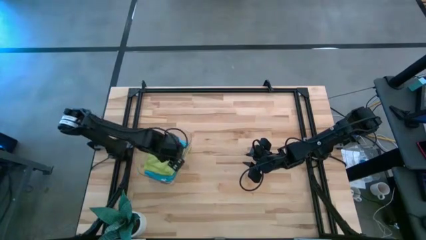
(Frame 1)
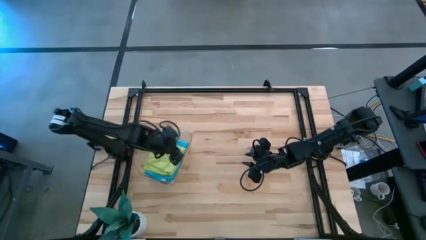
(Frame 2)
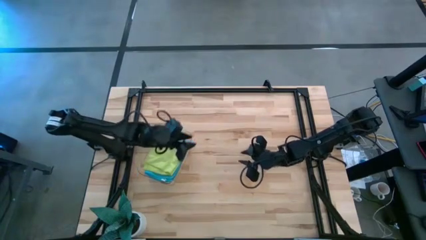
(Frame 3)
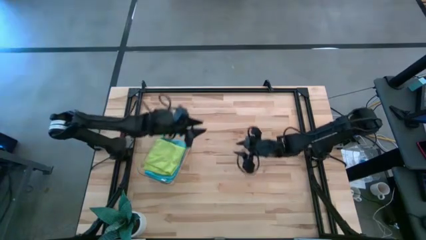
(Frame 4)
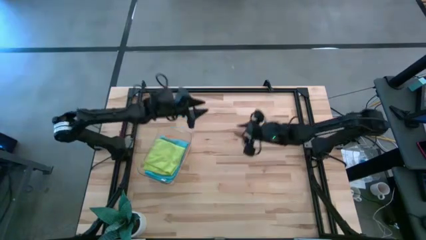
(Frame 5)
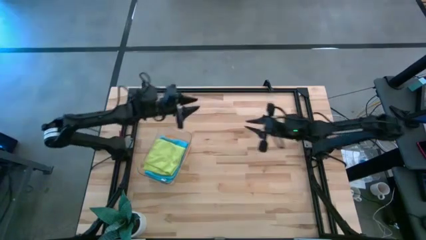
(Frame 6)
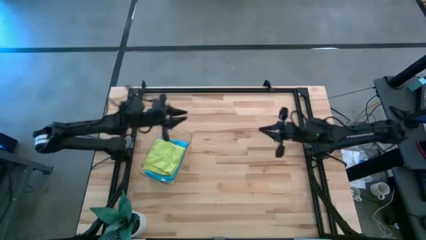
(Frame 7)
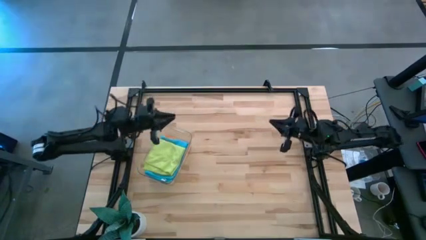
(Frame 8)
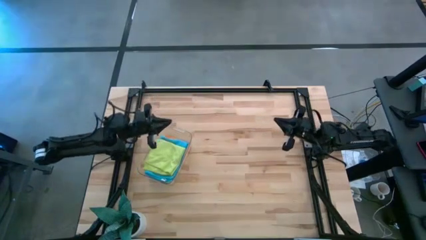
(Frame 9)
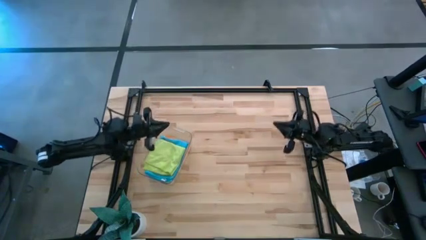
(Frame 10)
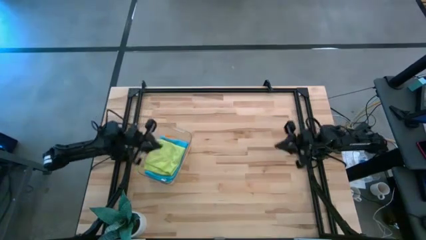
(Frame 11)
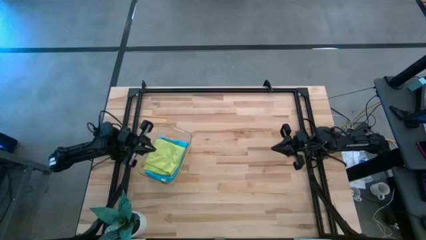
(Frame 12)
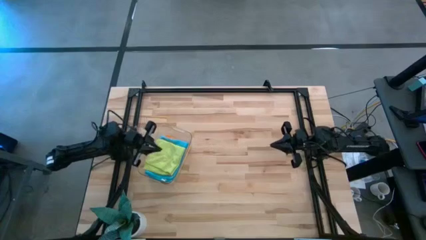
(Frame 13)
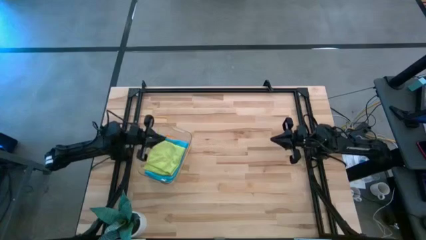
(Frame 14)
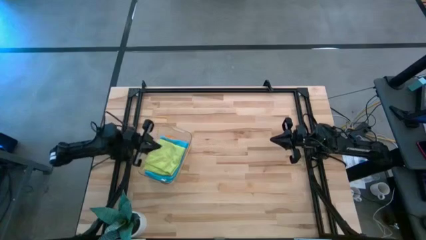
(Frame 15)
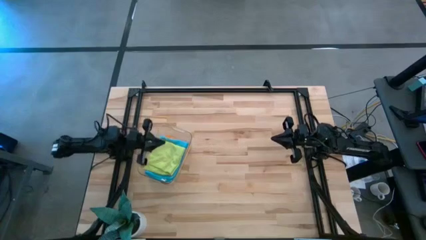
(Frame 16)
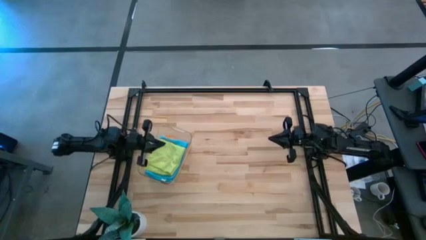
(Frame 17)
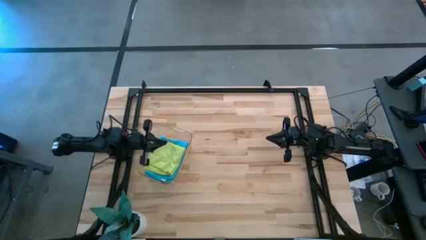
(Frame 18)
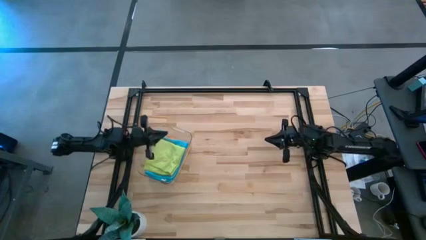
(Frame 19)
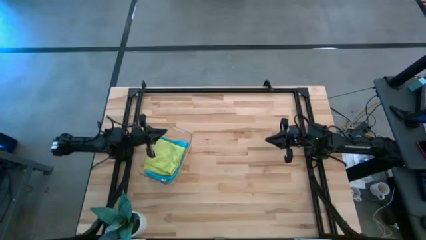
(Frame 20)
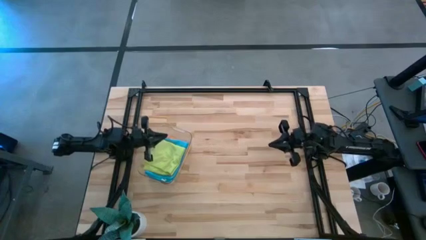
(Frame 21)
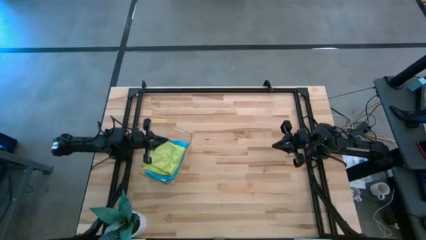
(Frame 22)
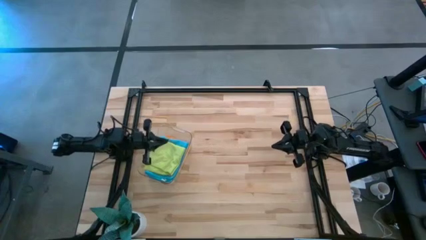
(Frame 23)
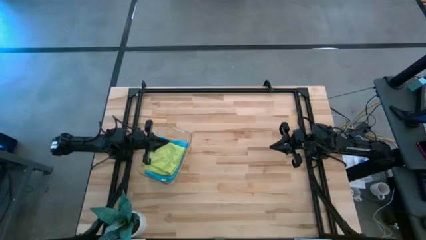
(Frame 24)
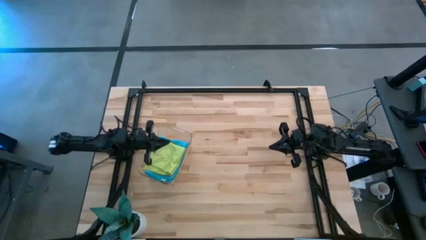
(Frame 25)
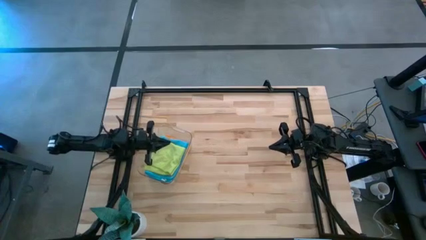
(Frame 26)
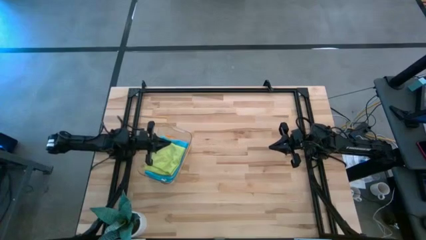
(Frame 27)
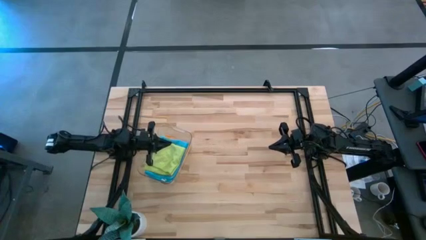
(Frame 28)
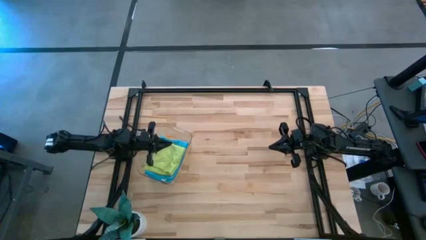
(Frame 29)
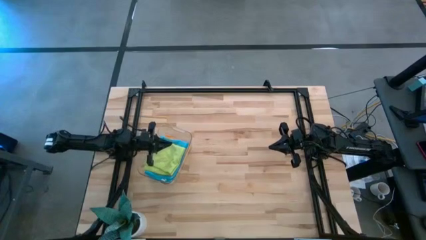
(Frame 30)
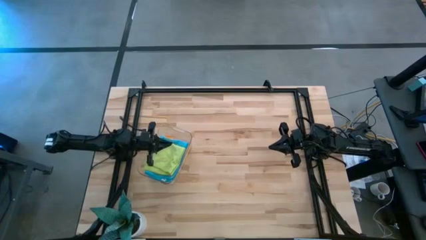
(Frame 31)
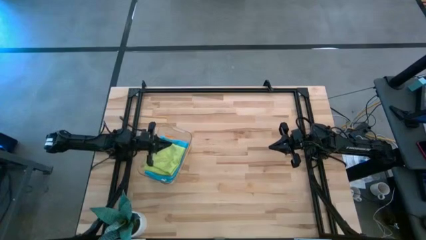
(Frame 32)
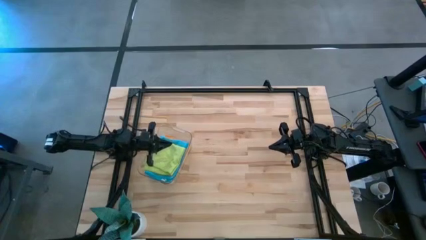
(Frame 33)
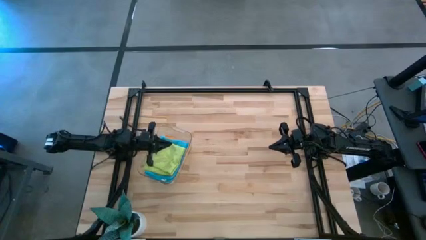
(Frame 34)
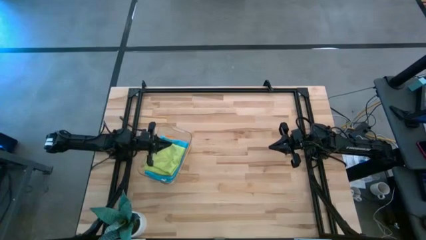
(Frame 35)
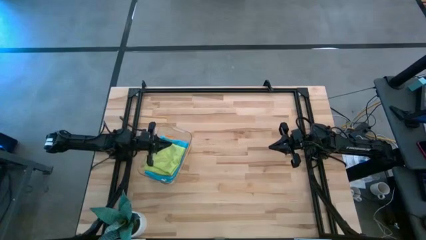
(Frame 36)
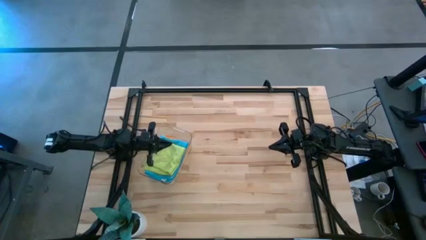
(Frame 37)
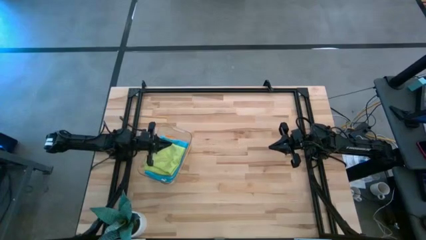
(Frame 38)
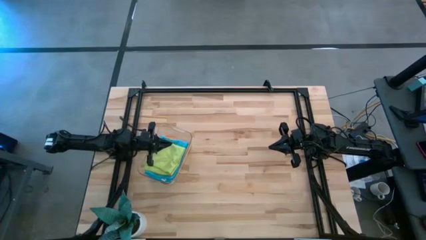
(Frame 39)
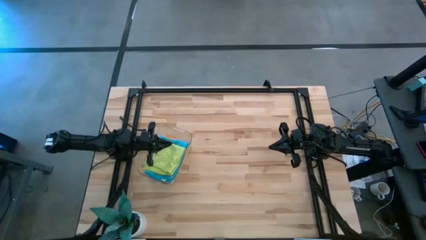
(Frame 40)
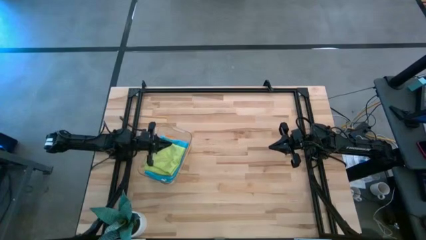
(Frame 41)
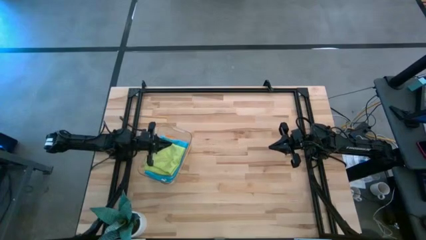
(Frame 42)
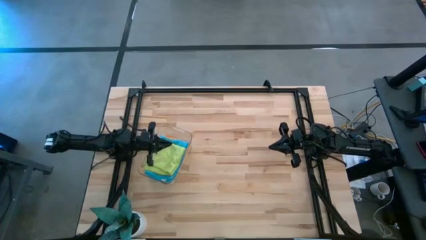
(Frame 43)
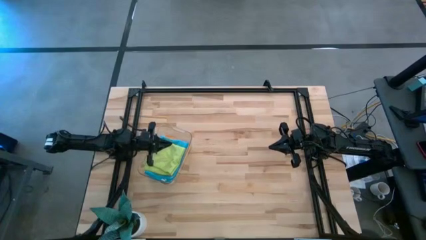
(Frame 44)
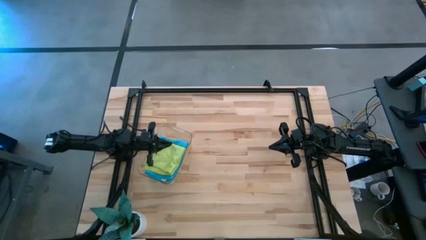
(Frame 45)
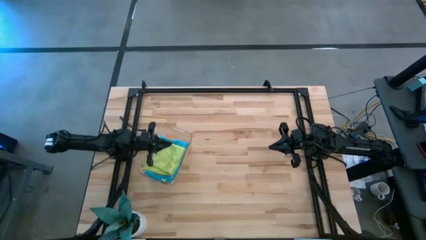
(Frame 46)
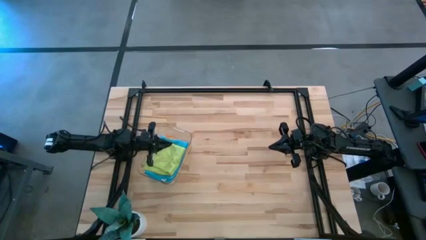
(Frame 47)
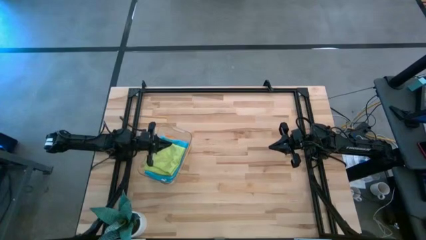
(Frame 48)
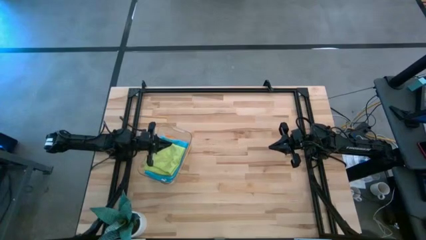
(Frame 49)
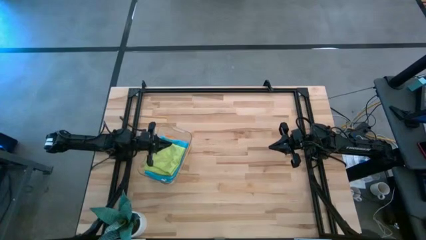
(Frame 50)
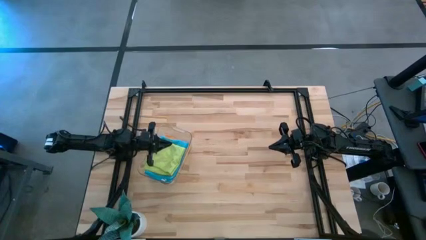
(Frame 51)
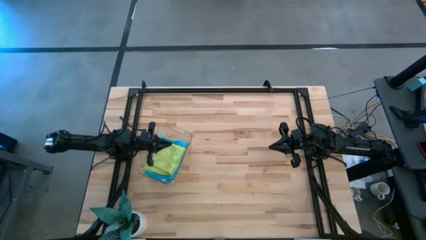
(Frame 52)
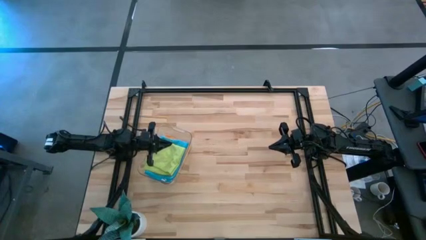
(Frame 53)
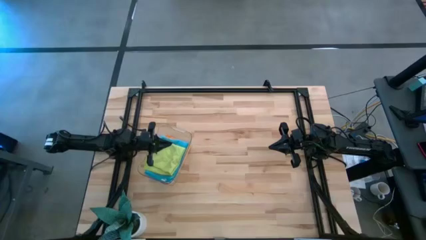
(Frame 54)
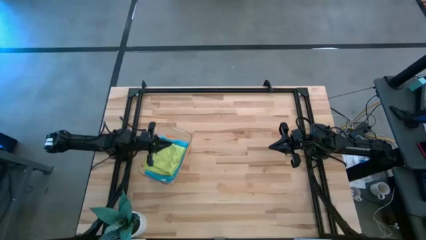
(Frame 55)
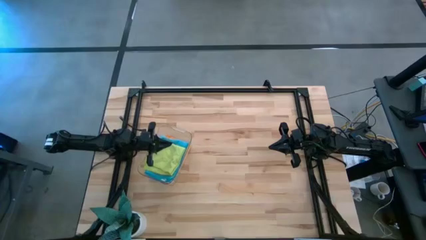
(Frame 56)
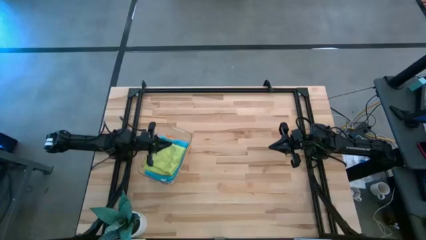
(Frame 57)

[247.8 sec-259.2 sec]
Task: Fold microfiber towels
Return to Home Position
